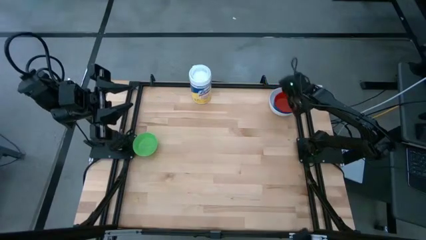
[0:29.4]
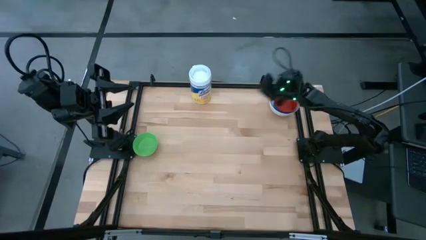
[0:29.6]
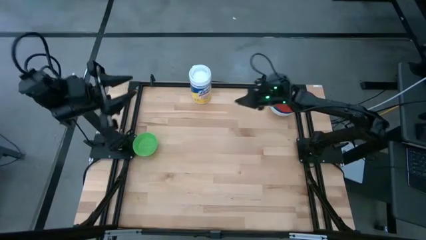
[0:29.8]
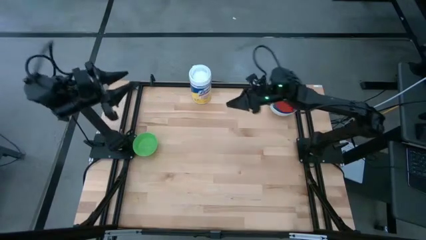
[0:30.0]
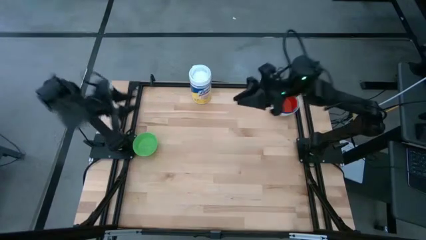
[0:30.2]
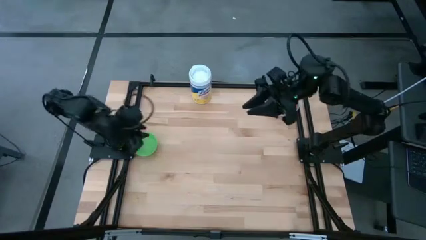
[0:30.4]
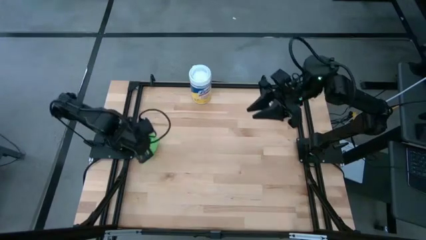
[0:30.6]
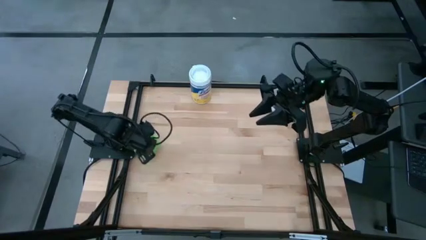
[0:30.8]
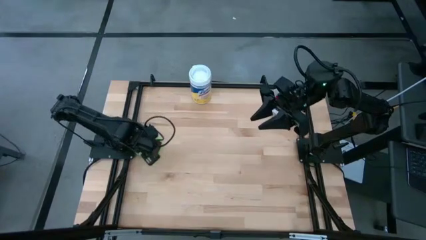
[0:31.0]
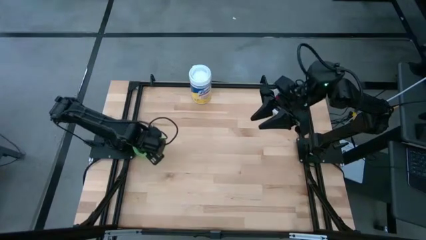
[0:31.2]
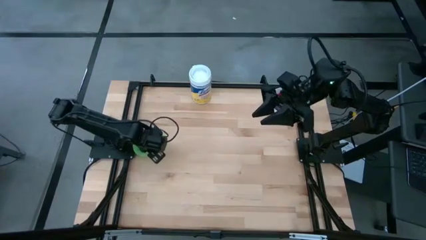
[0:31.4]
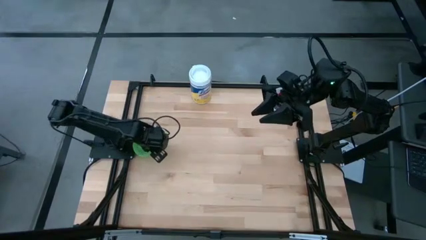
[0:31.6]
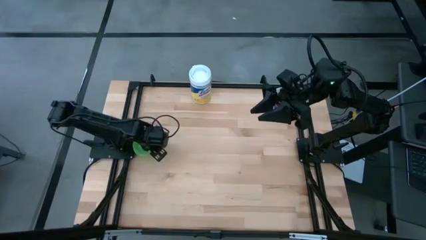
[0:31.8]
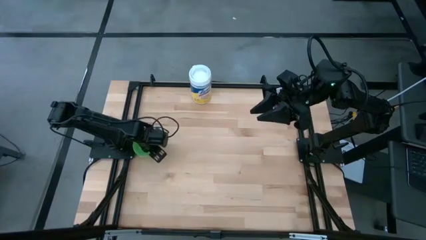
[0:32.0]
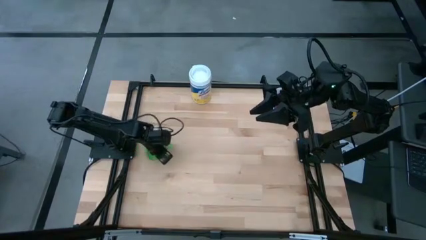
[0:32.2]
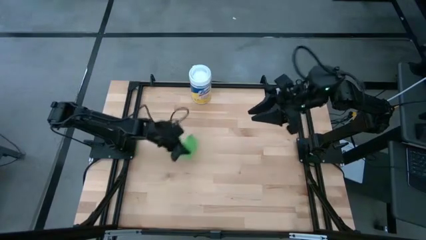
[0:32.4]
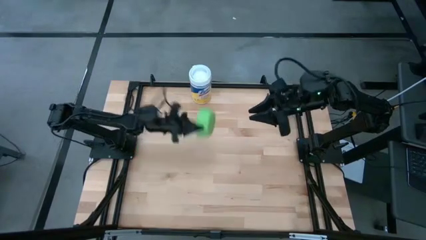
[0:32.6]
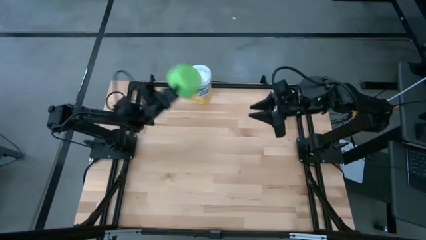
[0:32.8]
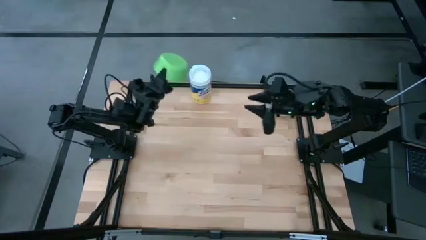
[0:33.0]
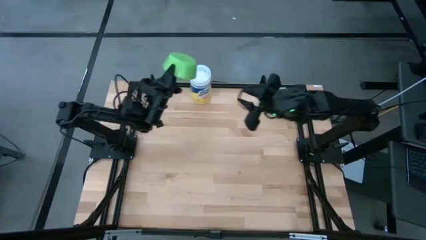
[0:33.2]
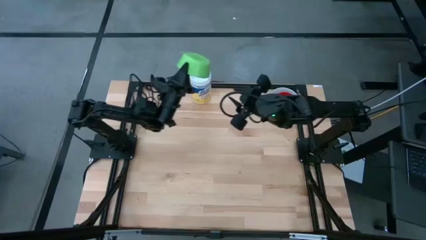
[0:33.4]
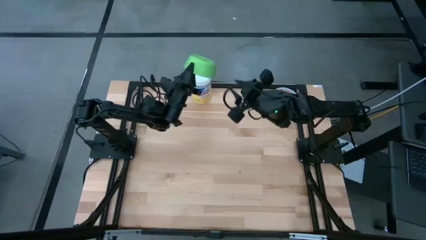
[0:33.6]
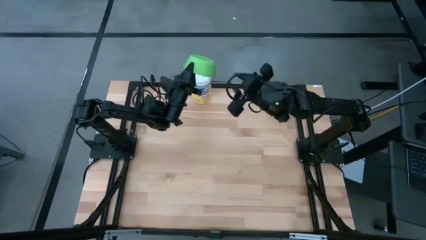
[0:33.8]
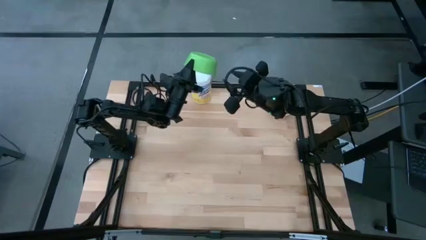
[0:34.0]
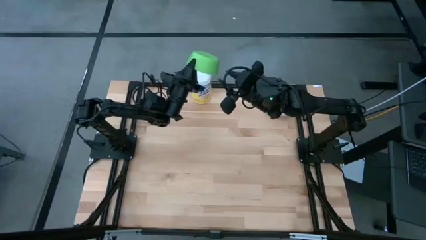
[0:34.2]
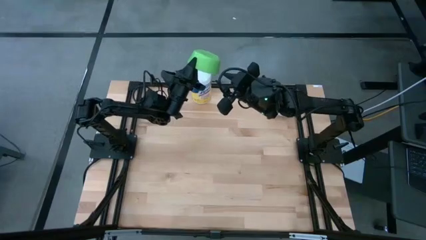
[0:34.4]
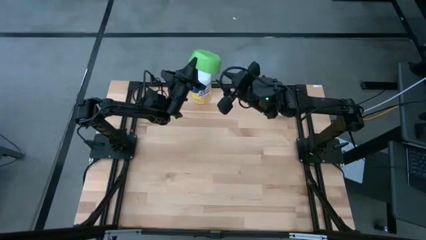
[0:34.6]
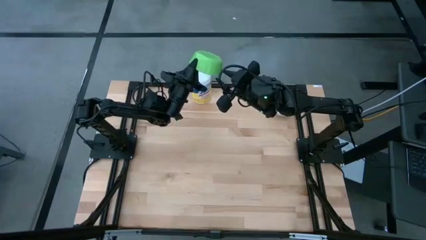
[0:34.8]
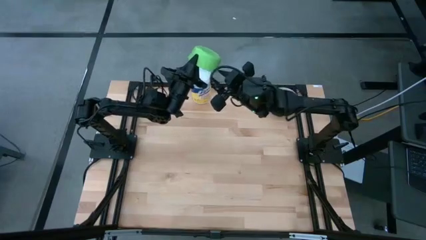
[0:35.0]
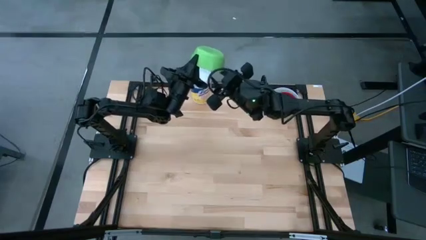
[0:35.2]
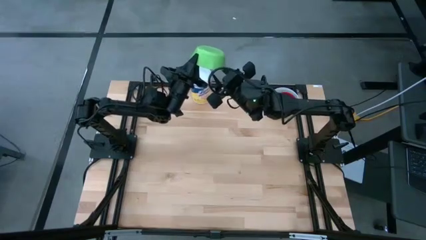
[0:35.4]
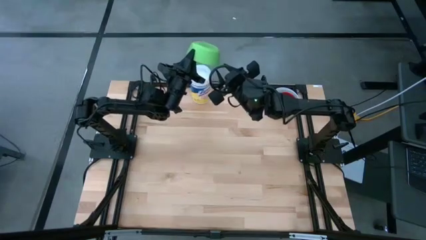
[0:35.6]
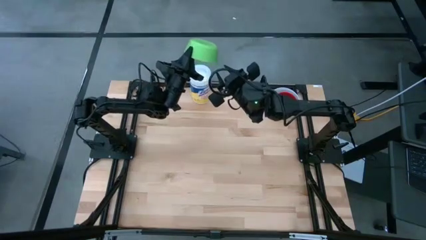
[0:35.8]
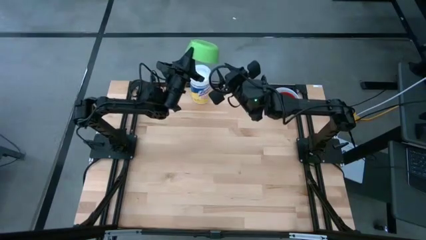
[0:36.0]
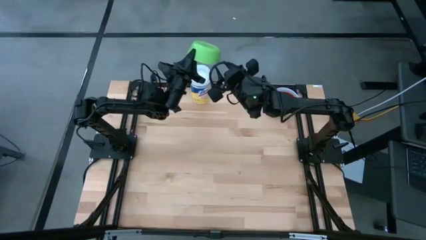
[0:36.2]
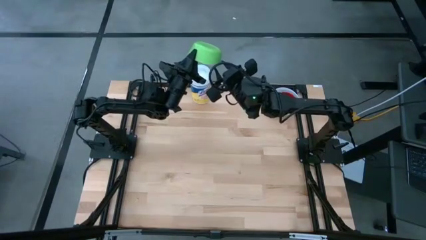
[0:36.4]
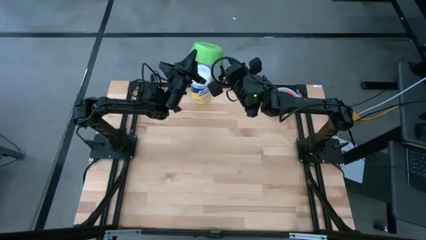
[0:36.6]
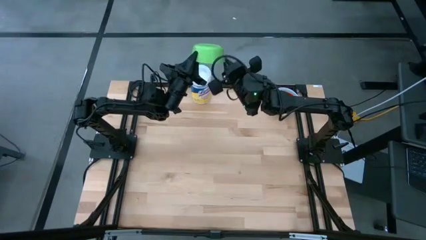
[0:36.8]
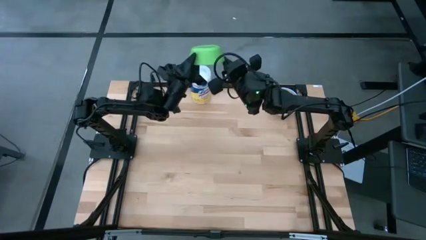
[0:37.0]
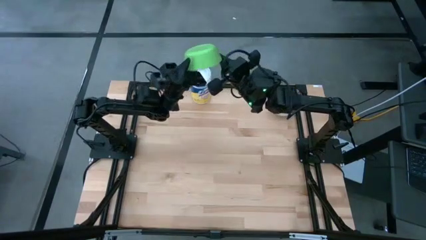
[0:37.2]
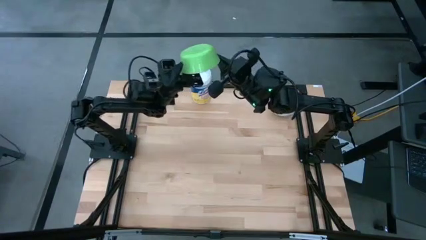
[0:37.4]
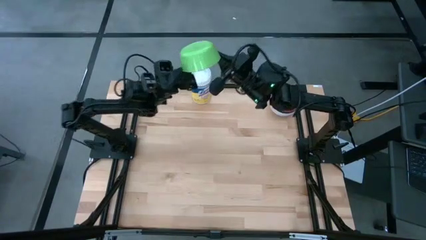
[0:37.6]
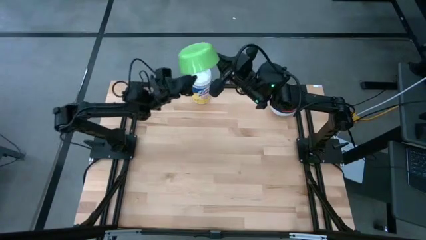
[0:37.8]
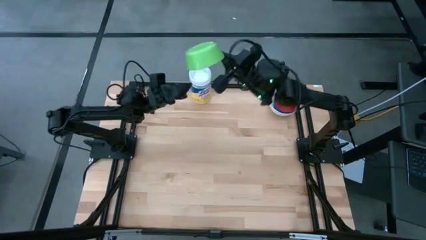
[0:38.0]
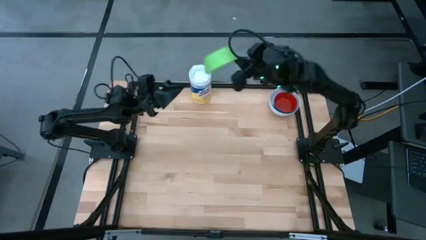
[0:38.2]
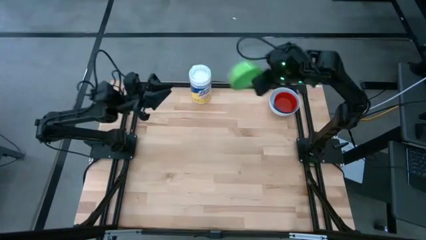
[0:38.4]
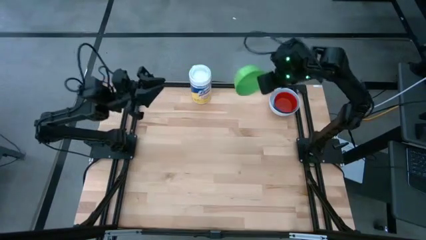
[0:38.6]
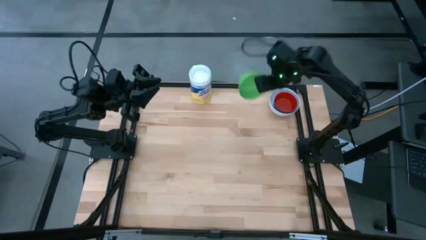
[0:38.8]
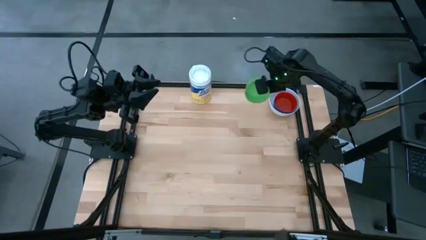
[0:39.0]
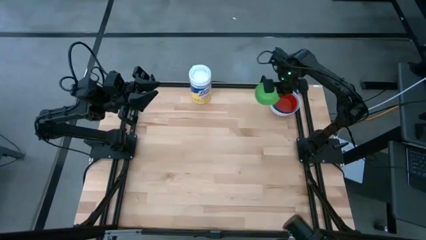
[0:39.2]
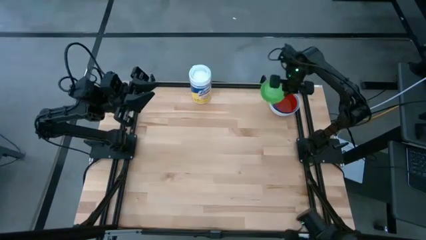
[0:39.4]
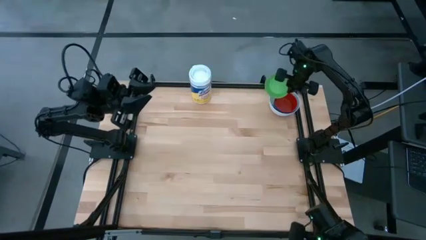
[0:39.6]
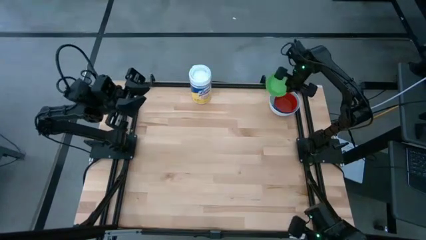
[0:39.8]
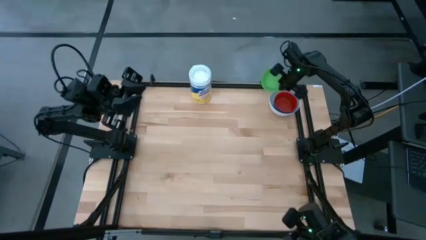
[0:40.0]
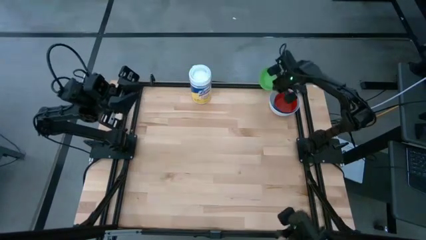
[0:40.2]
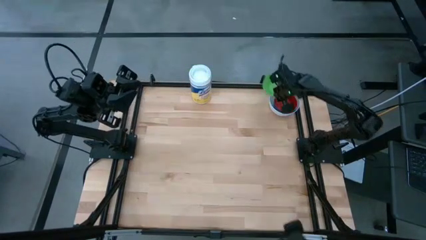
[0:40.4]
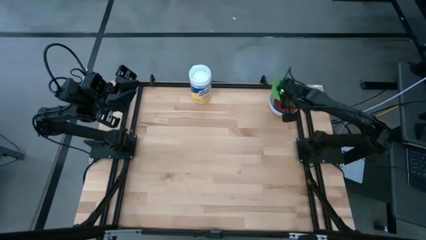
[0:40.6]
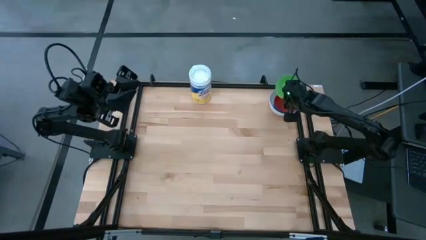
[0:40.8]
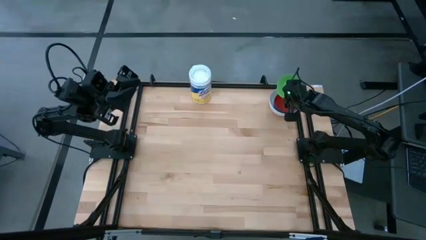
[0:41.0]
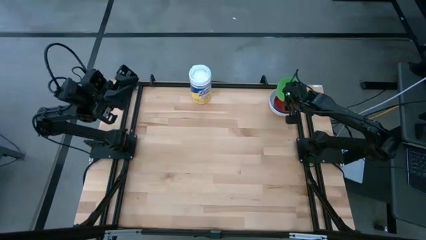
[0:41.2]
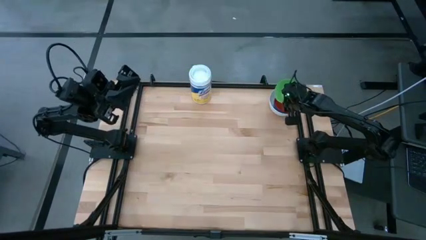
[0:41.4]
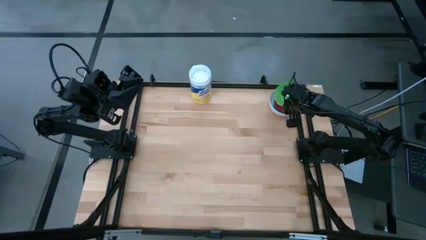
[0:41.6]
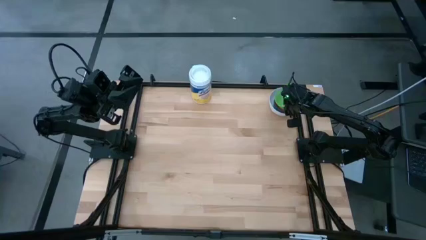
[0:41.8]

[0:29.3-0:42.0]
Stack the green bowl on the red bowl

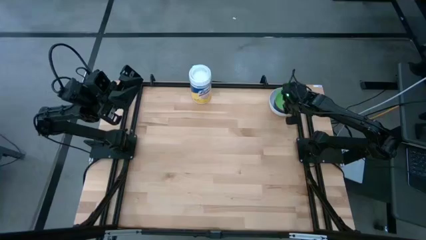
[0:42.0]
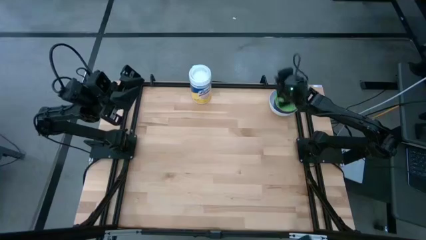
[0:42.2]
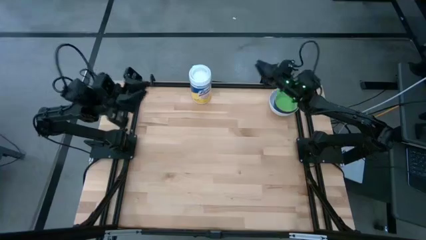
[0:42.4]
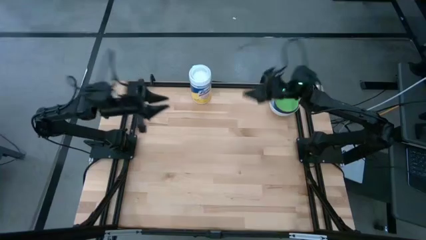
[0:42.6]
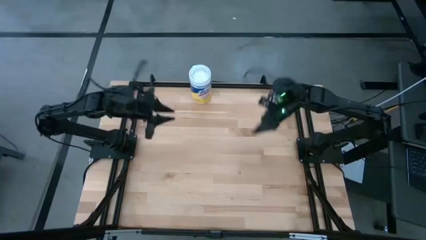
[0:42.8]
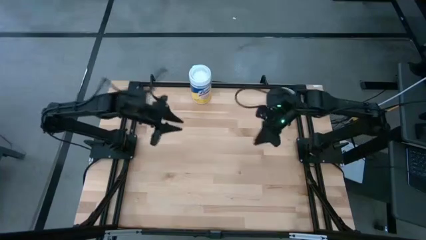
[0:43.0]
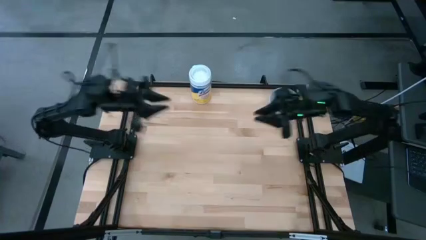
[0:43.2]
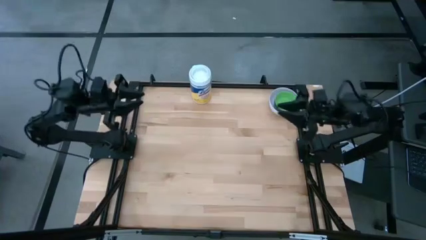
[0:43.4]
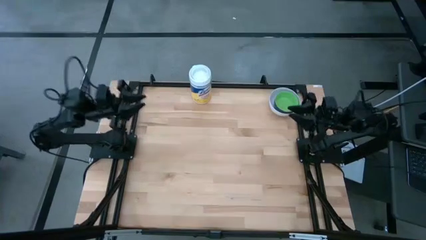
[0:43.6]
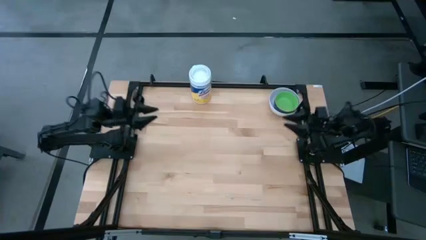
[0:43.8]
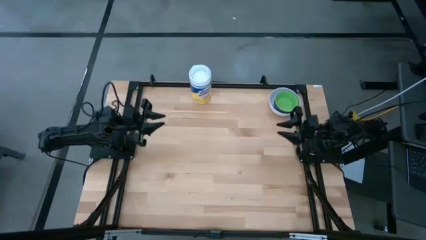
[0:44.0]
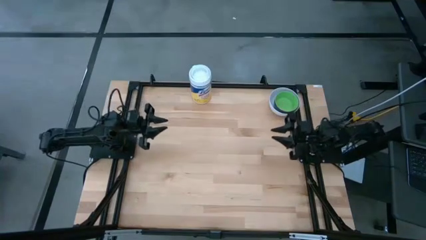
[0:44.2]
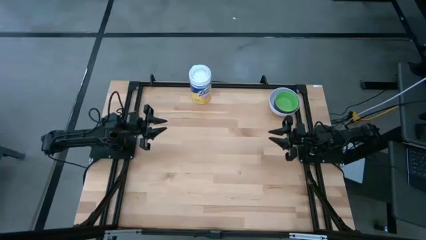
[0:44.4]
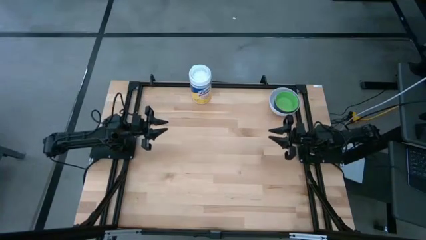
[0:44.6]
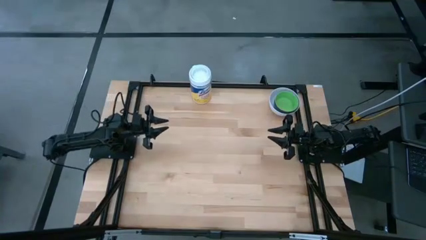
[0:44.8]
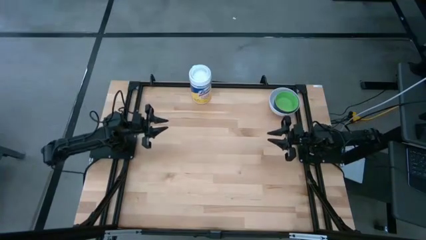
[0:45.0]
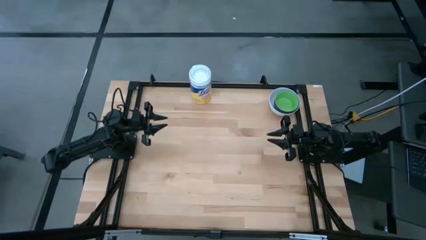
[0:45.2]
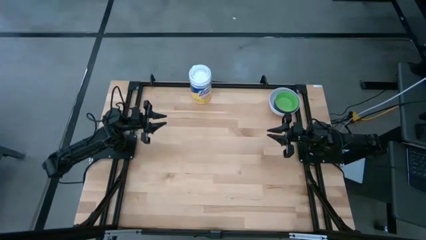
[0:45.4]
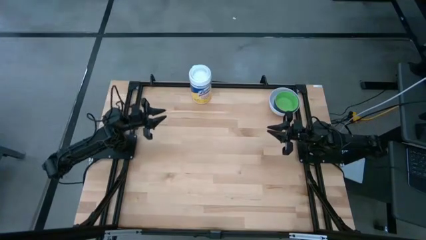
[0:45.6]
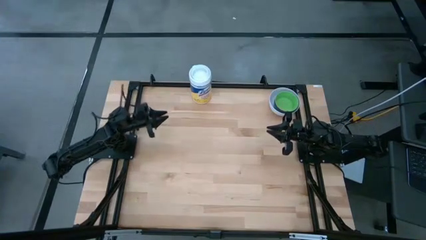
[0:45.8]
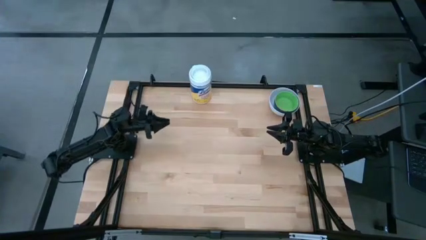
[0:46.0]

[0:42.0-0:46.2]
Return to Home Position
